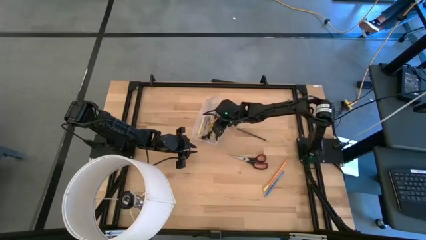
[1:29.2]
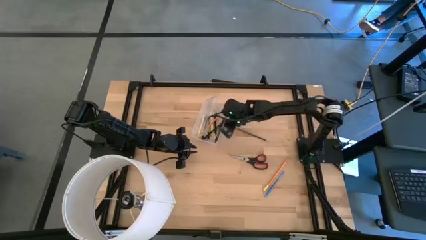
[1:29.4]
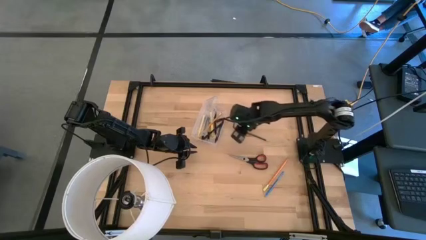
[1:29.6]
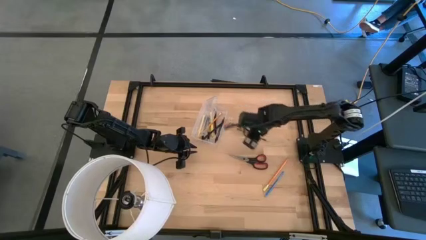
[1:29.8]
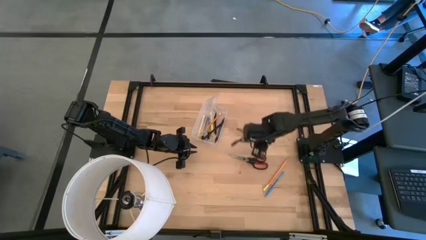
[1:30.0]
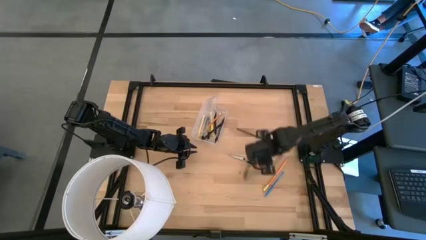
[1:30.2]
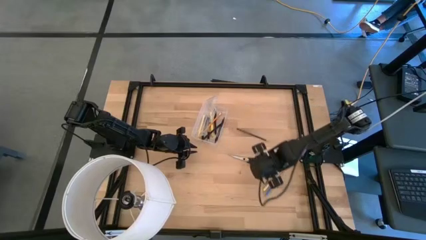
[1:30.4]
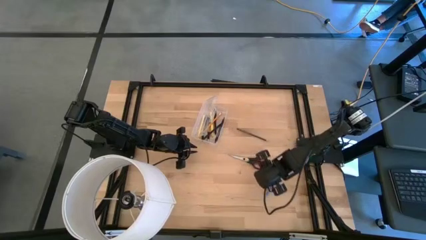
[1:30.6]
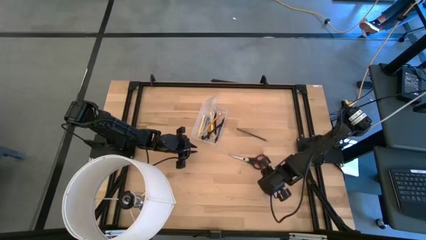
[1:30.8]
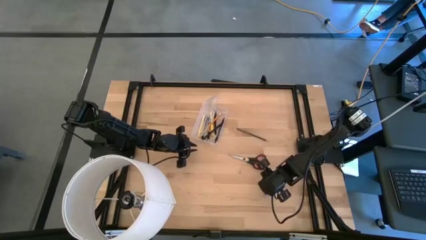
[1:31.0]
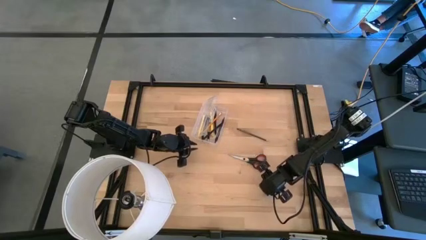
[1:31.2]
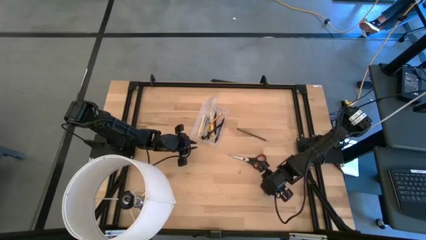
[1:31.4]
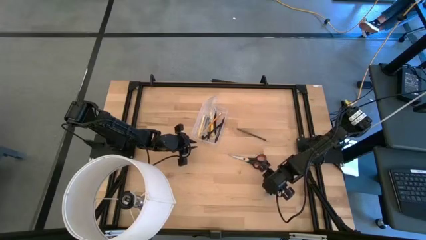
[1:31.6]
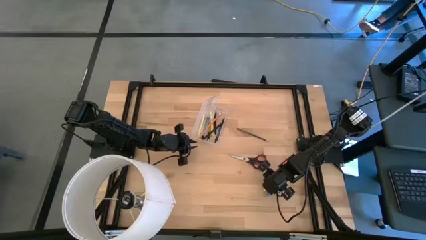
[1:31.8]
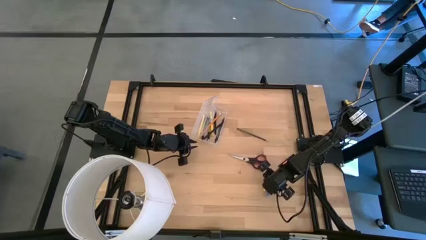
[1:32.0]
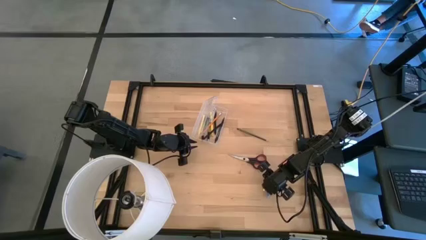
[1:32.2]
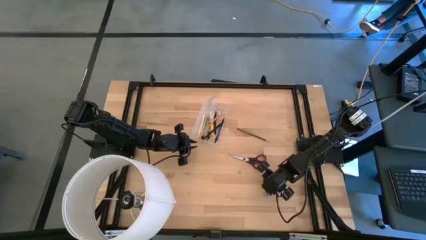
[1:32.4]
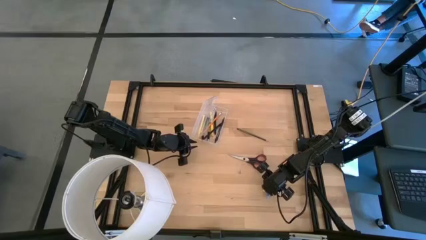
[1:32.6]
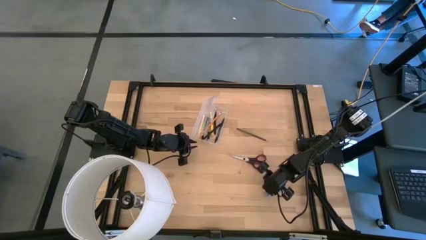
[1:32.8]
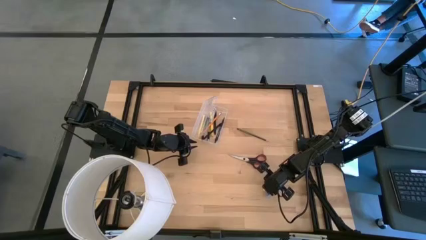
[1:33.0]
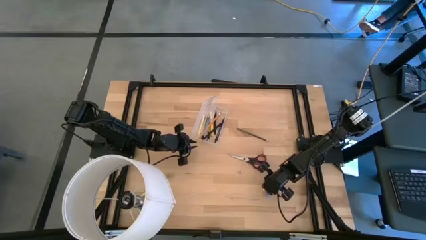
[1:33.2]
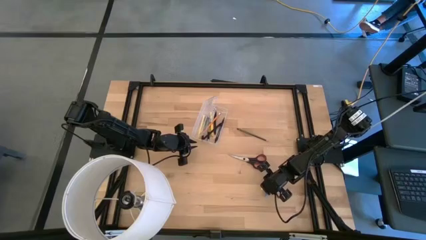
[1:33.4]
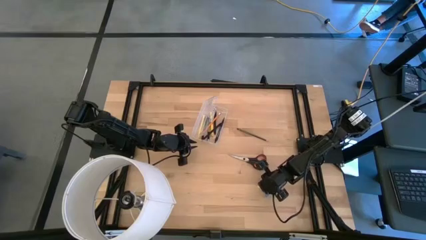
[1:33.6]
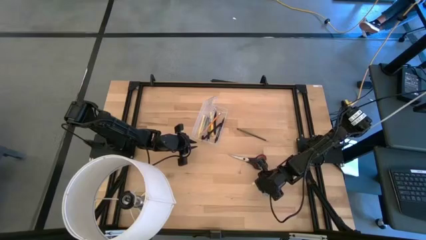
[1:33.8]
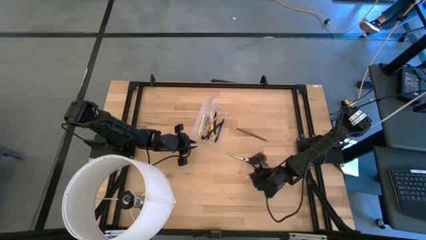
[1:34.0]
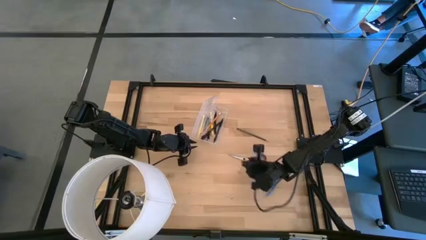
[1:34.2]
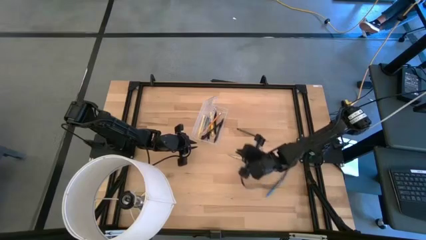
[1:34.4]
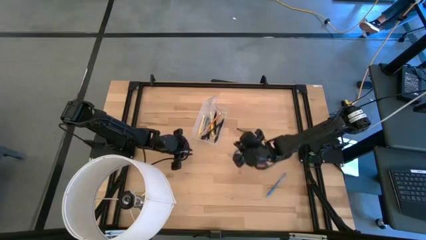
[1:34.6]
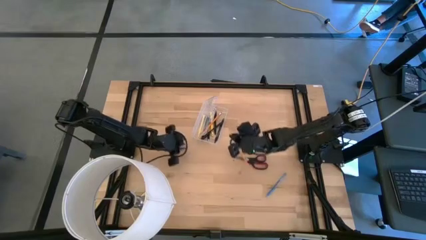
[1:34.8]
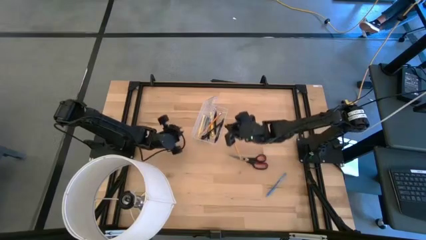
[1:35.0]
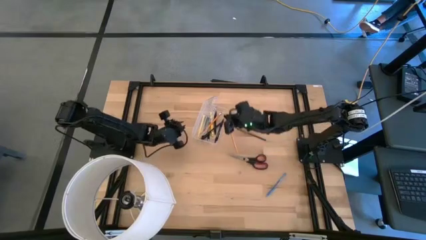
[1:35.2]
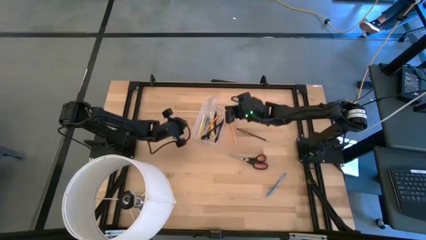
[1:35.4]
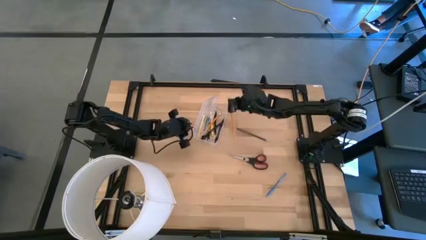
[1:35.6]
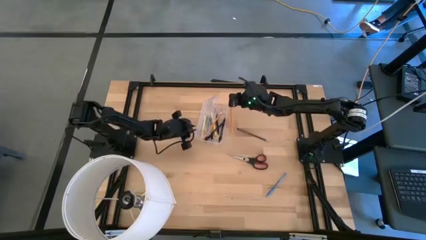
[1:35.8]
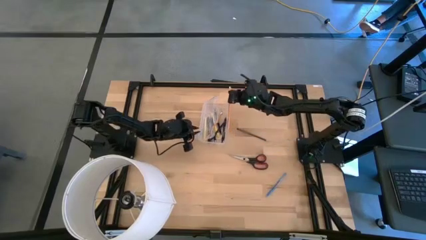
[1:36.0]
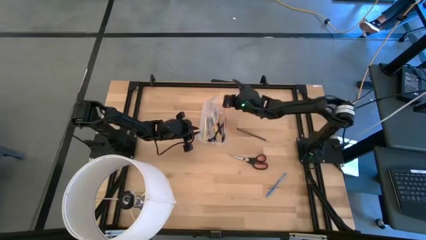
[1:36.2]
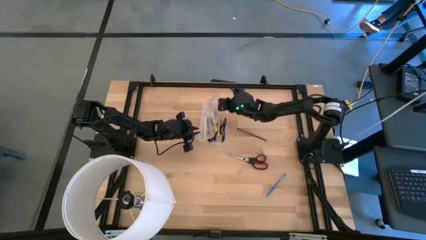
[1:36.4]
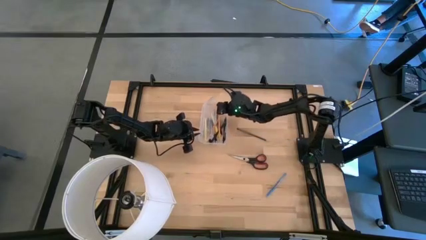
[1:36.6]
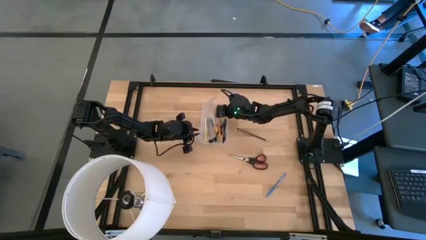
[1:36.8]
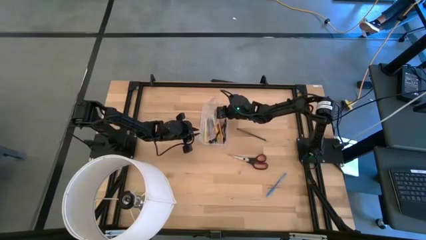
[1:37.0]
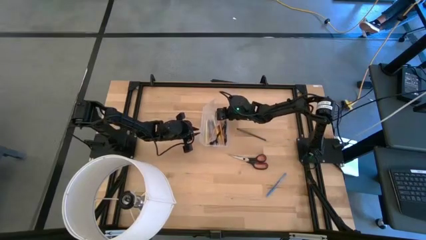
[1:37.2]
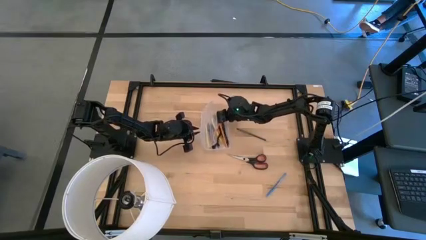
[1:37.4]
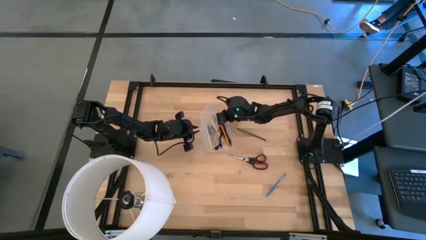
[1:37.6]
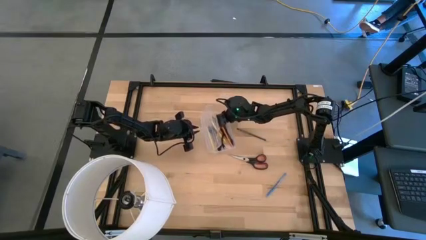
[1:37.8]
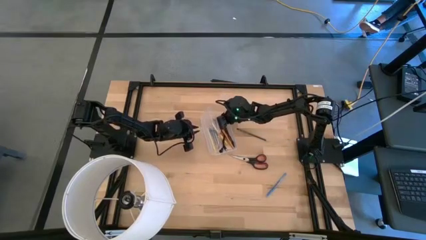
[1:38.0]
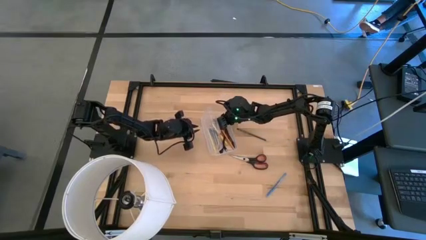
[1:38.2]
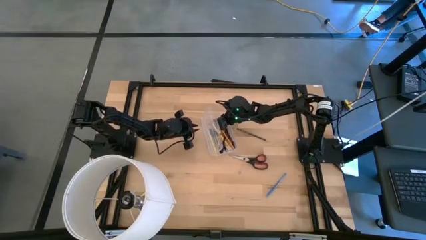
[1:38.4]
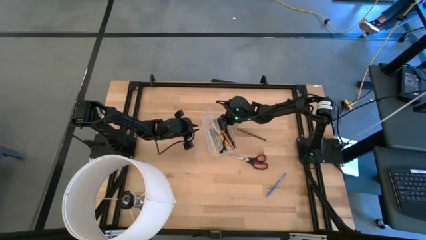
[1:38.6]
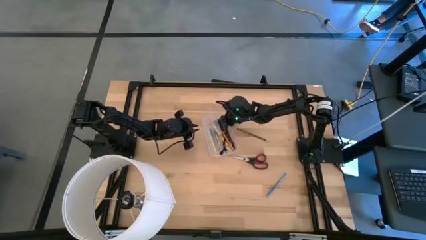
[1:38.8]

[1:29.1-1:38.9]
Task: Pick & place school supplies into a supply box
Put the orange pencil into the transparent supply box

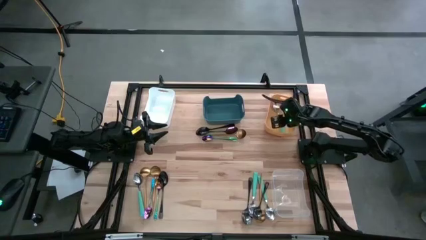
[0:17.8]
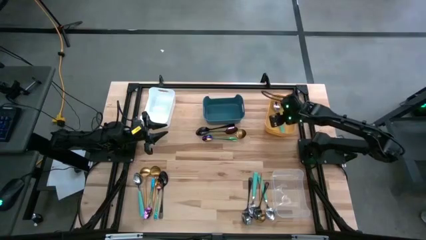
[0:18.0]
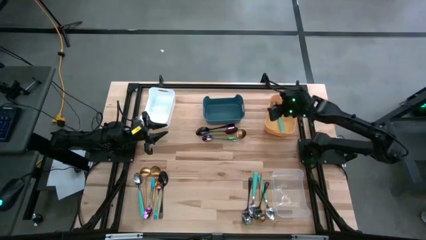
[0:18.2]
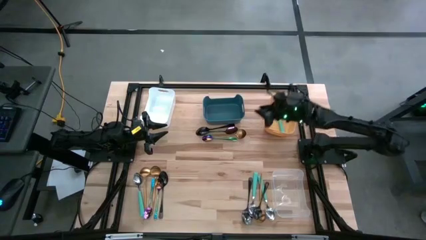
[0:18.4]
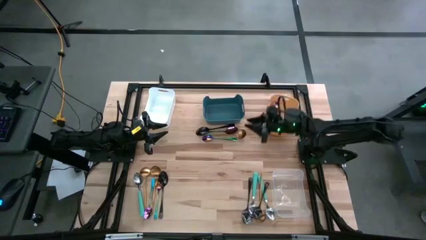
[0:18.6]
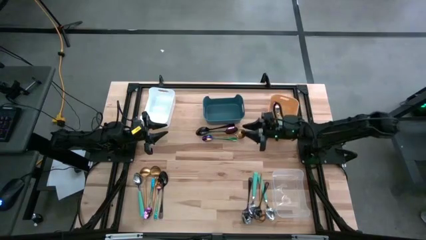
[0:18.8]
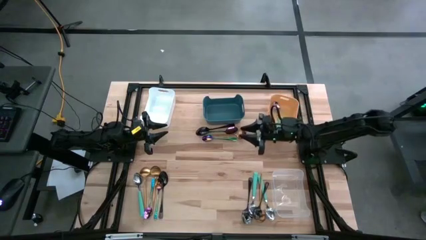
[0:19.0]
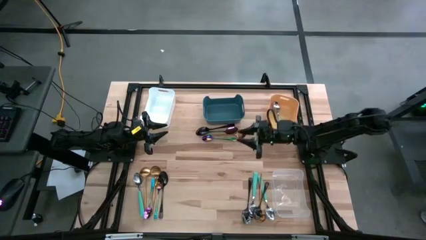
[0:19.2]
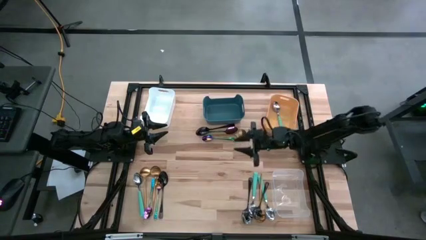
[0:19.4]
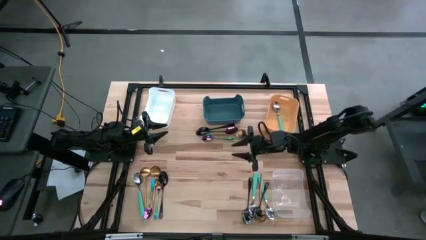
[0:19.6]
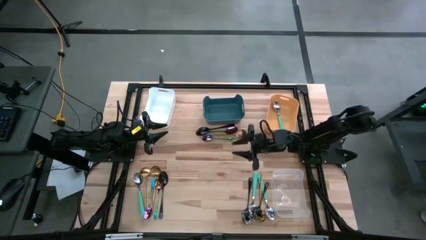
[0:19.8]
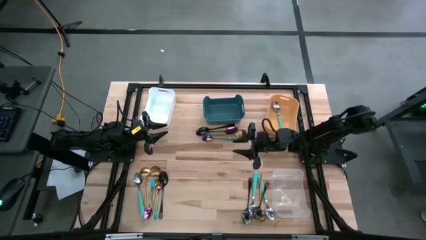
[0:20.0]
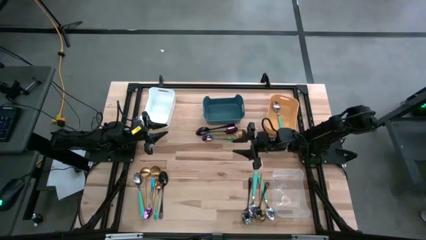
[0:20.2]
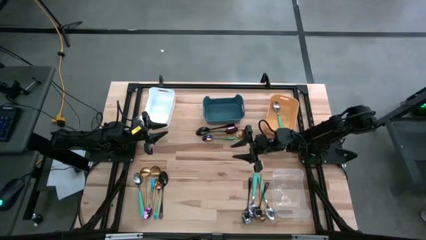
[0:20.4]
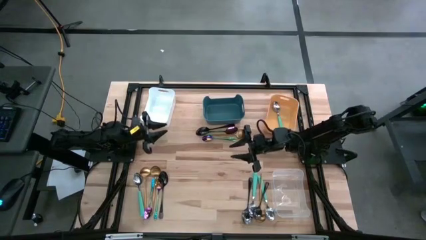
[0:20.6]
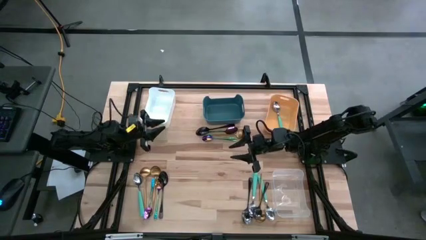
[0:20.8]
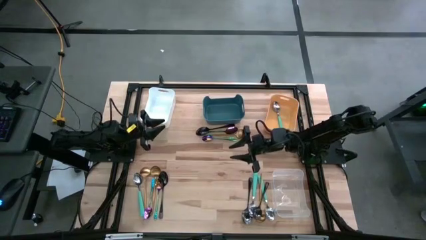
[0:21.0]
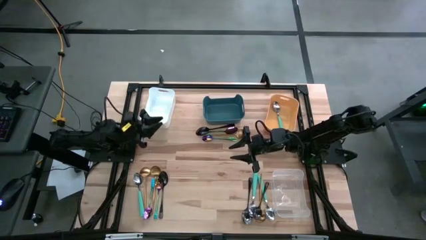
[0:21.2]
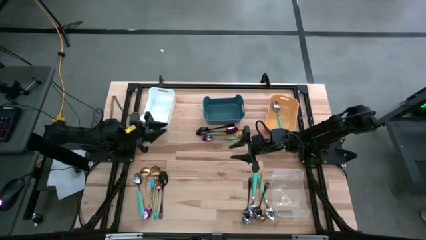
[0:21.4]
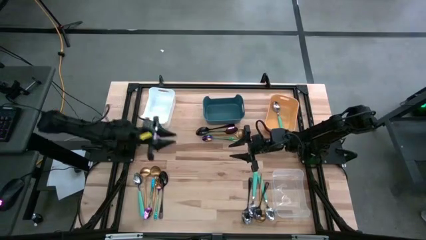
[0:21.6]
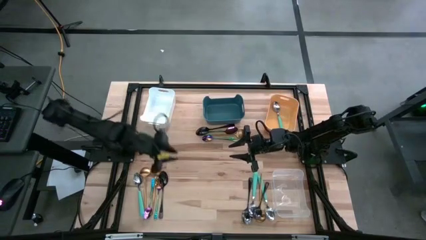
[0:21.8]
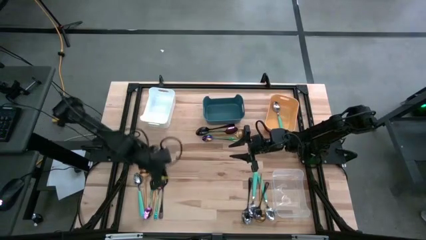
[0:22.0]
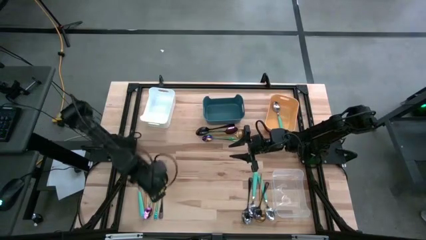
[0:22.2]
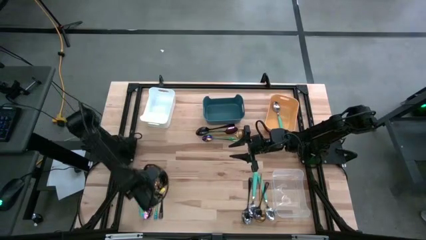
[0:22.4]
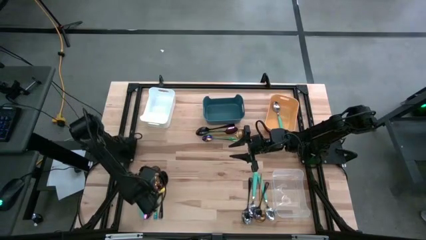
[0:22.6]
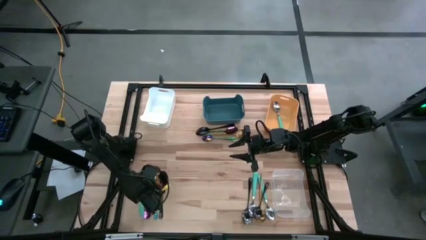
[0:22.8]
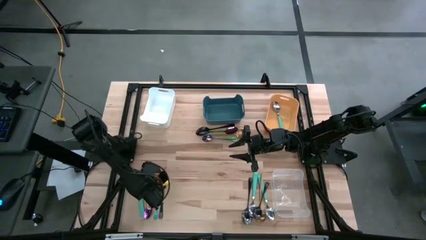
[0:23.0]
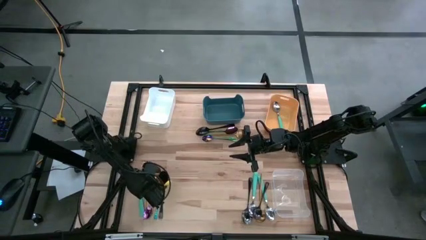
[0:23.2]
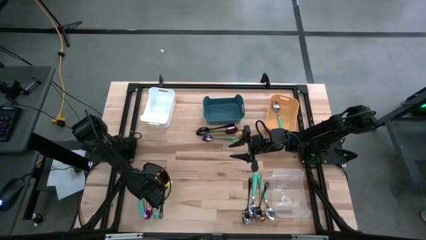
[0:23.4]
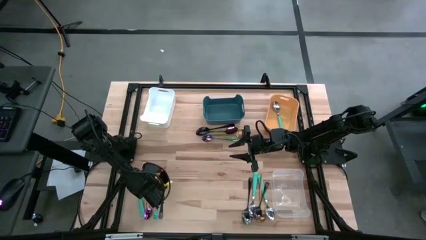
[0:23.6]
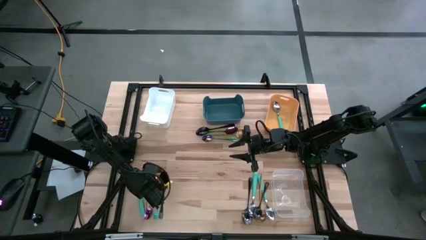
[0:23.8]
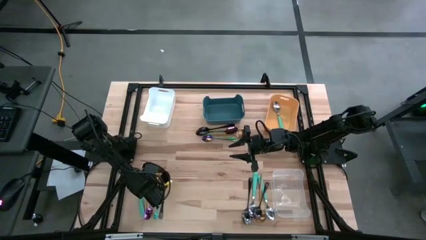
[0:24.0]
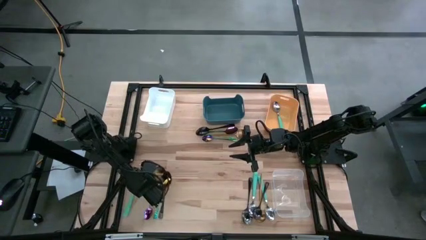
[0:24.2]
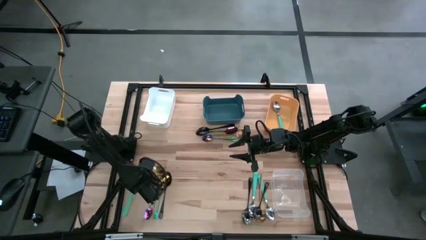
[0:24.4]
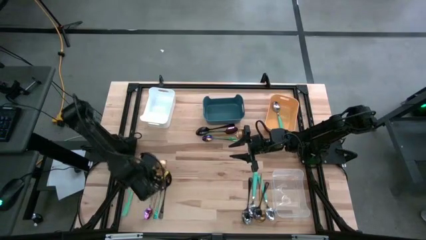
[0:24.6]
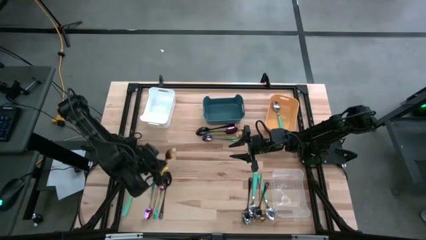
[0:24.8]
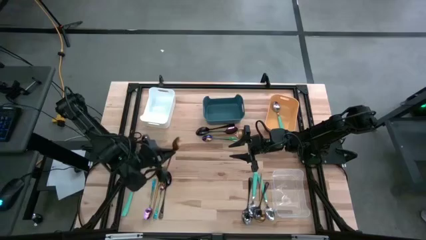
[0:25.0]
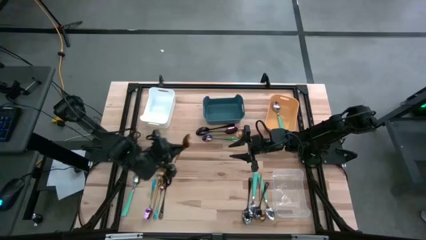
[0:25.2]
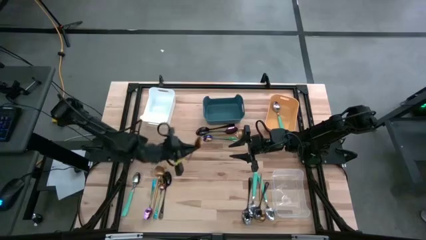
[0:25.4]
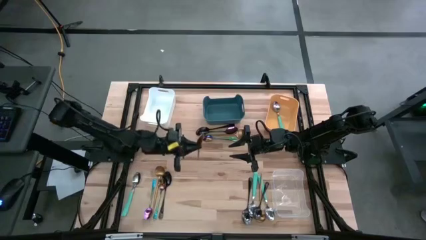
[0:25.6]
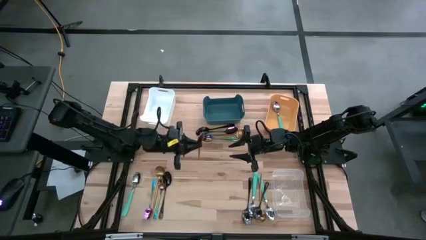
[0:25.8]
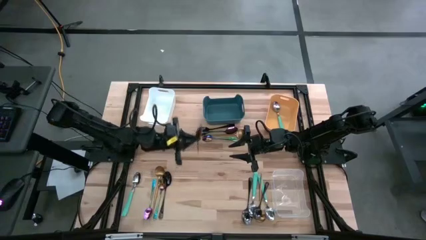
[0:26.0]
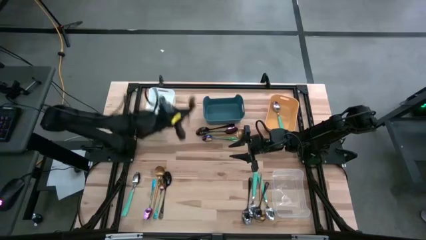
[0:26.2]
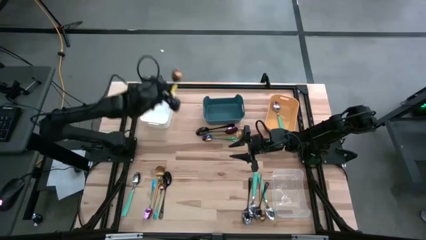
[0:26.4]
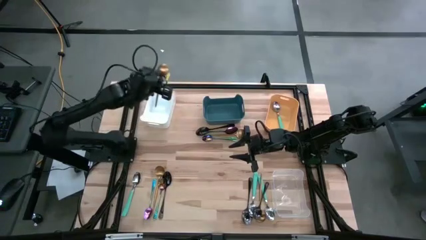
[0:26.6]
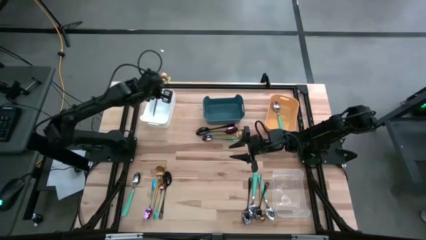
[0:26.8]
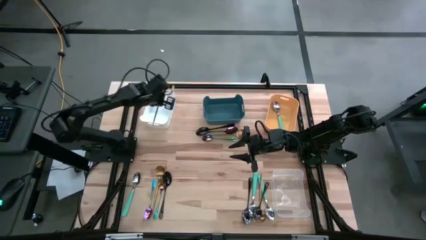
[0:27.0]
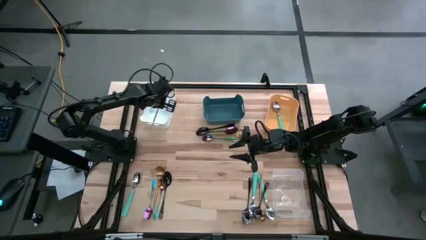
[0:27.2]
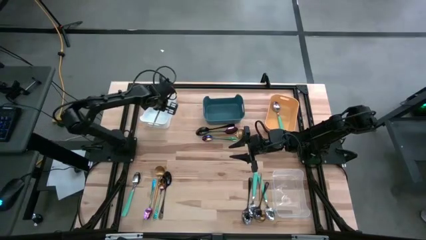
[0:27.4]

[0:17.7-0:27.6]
Task: Sort silverware by color (type)
Put the gold spoon into the white bin
